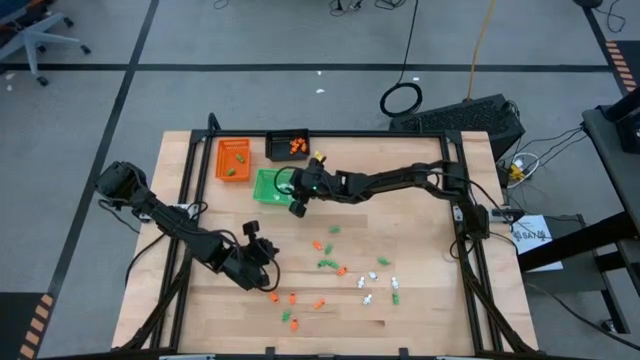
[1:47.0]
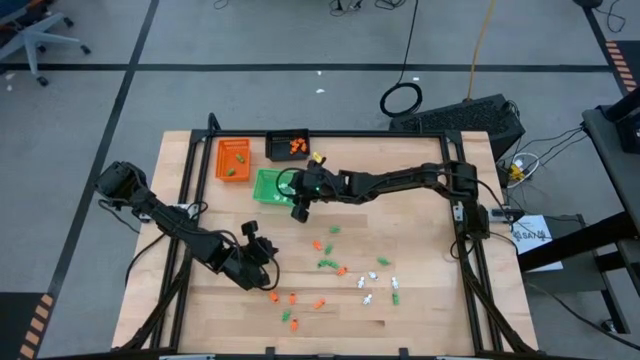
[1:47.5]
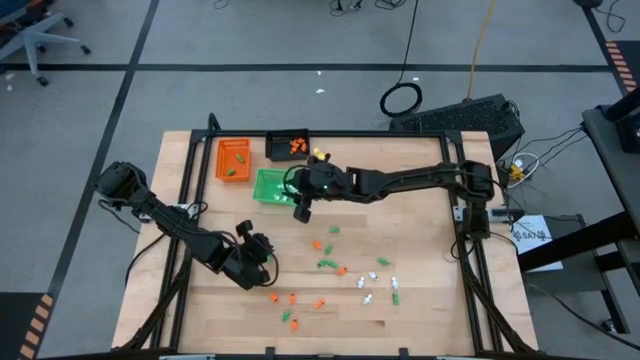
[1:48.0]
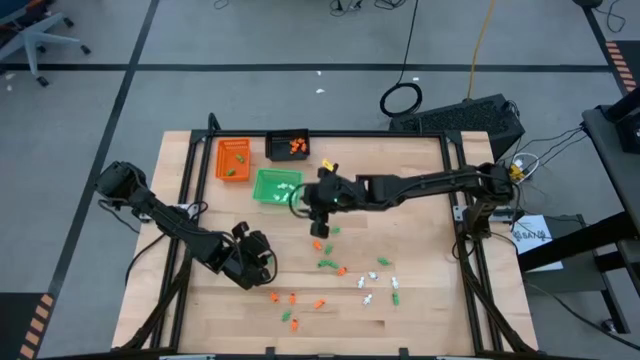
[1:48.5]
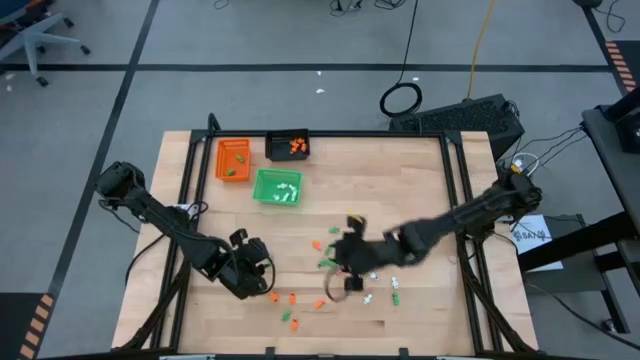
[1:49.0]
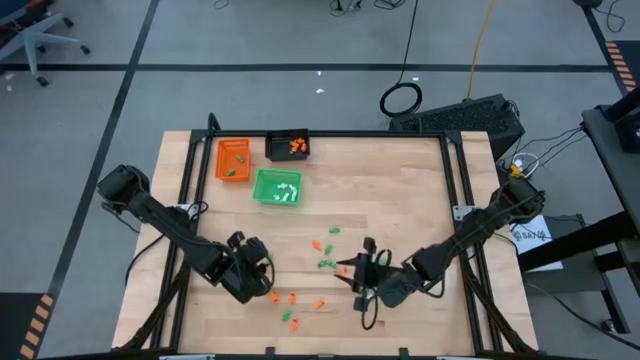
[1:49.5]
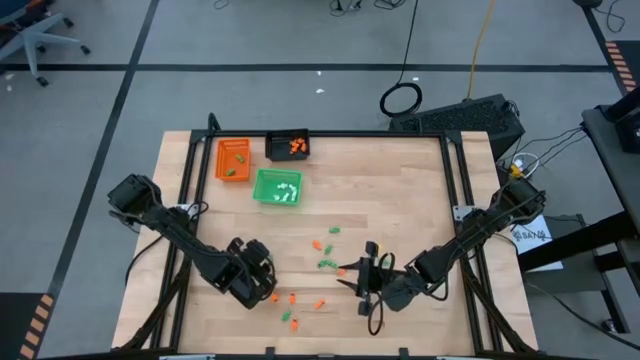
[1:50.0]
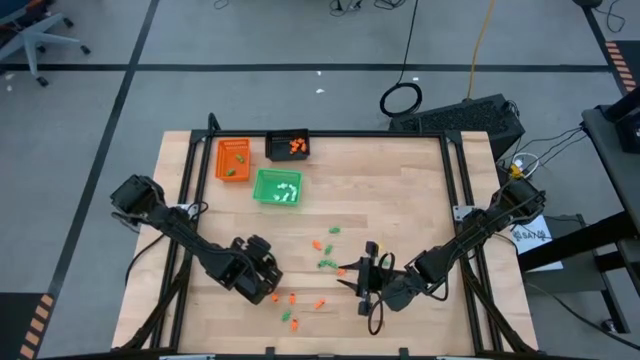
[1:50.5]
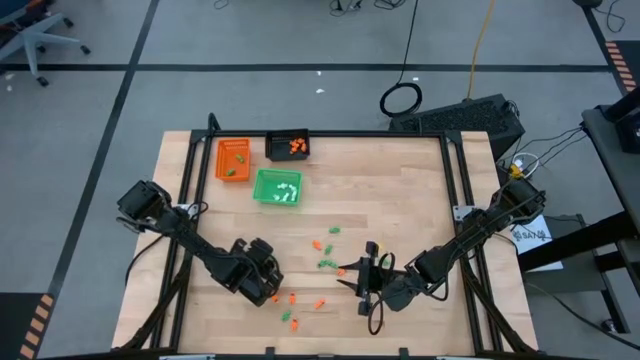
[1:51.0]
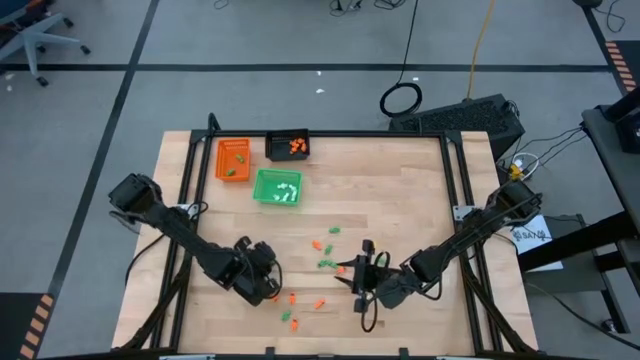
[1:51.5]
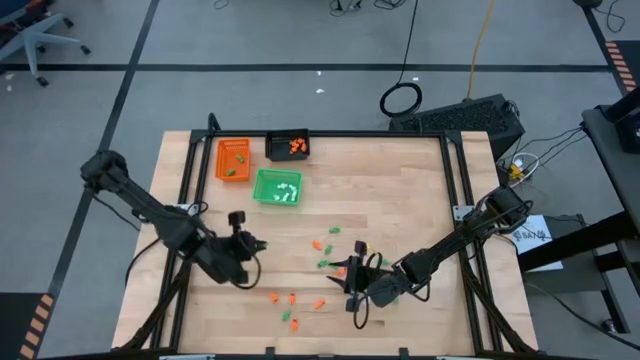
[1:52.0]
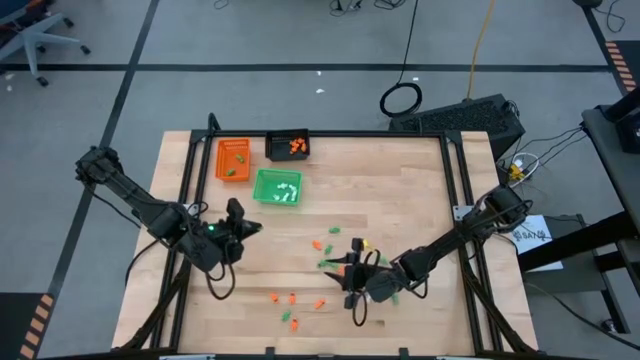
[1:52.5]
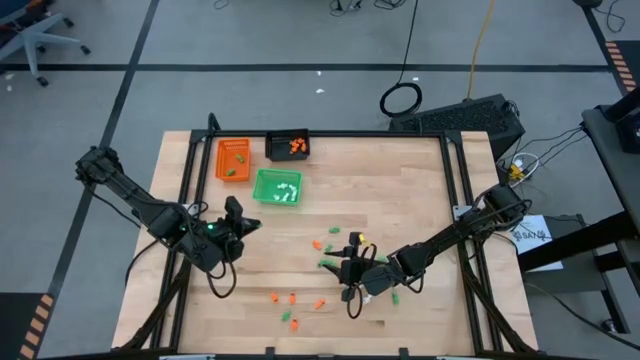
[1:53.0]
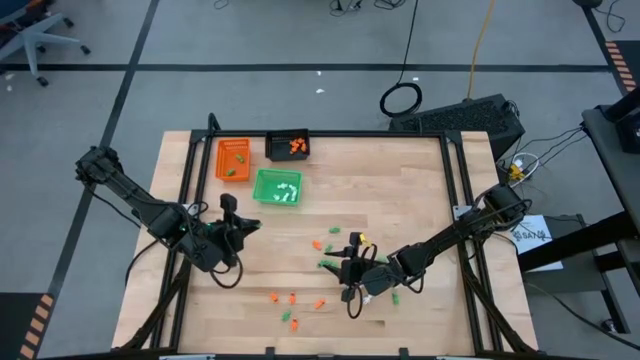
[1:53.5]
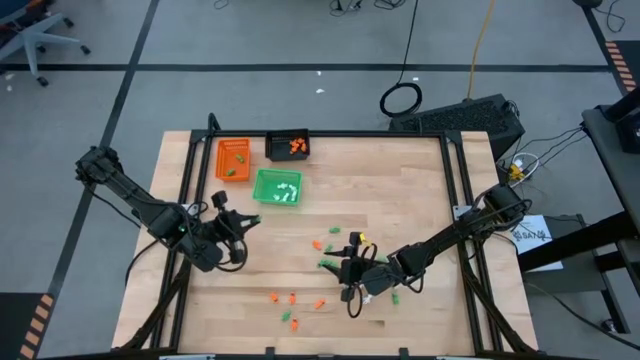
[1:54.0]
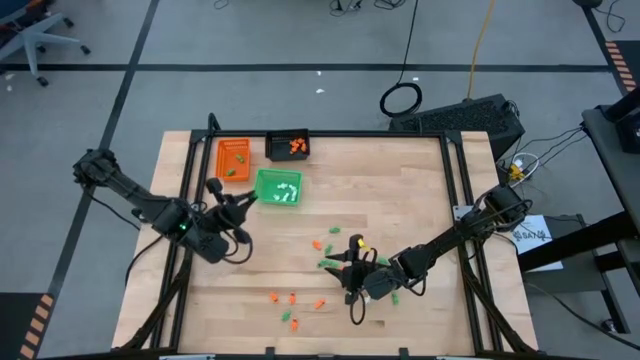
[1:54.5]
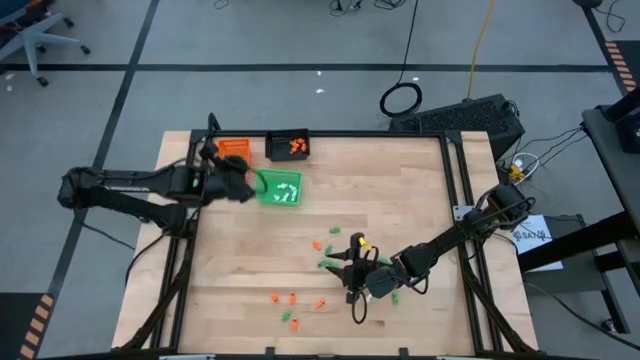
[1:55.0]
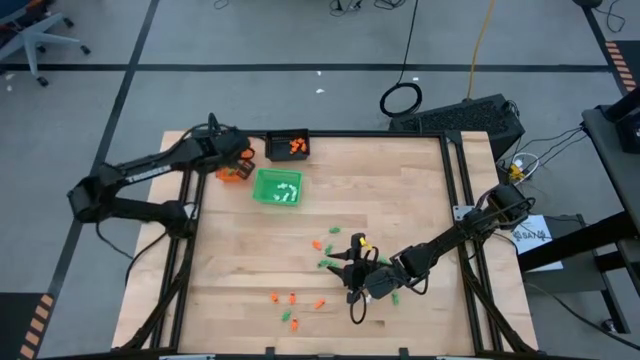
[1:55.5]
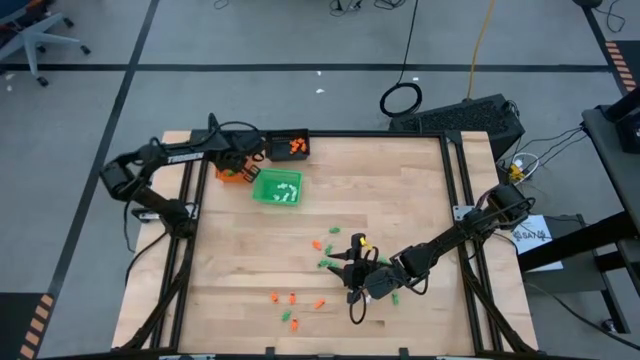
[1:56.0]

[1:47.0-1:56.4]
Task: Sort Halloween decoration
Put the green skeleton toy into the orange bin

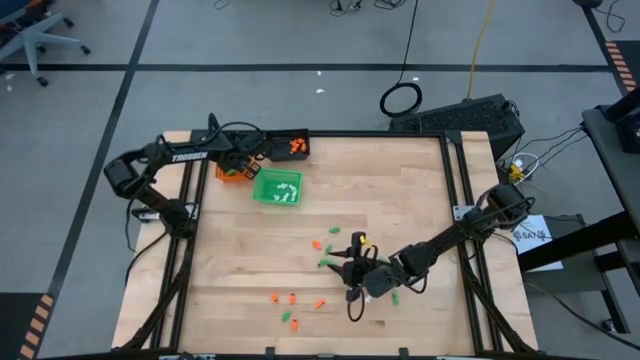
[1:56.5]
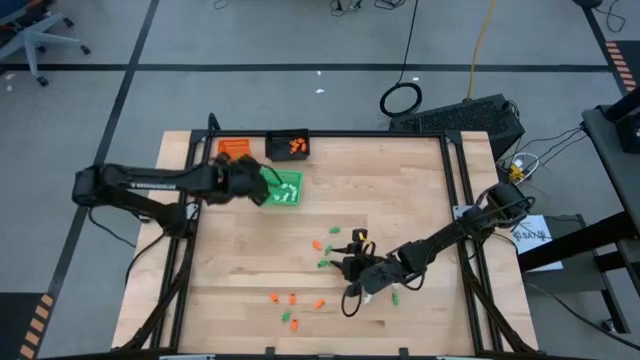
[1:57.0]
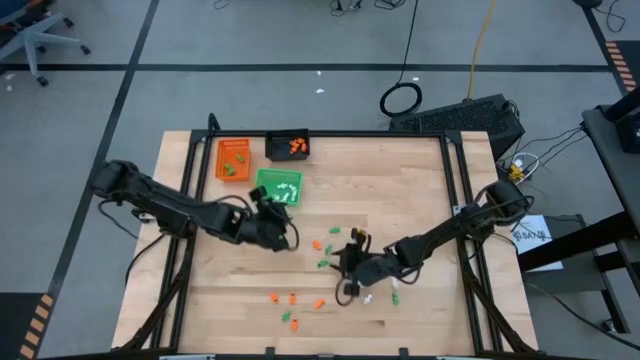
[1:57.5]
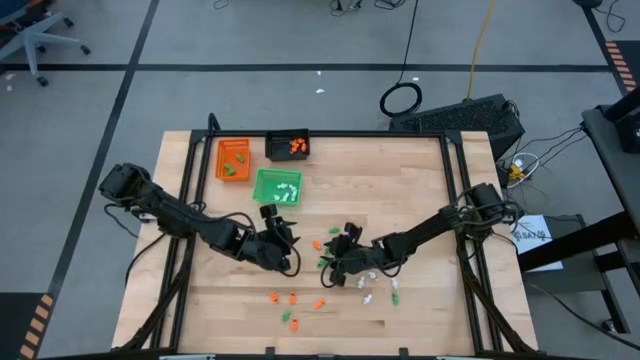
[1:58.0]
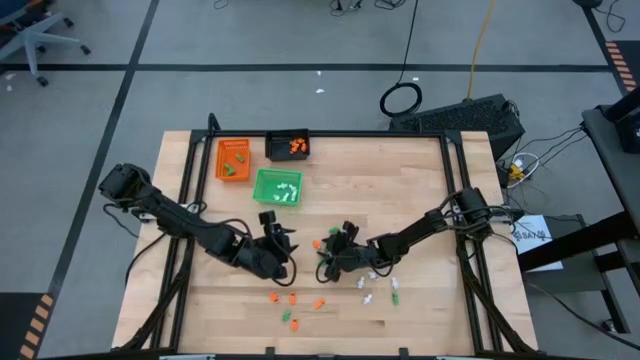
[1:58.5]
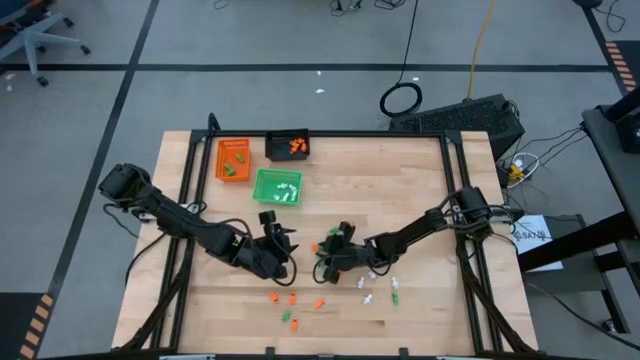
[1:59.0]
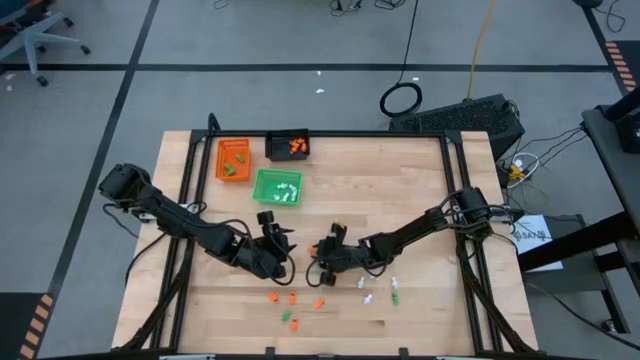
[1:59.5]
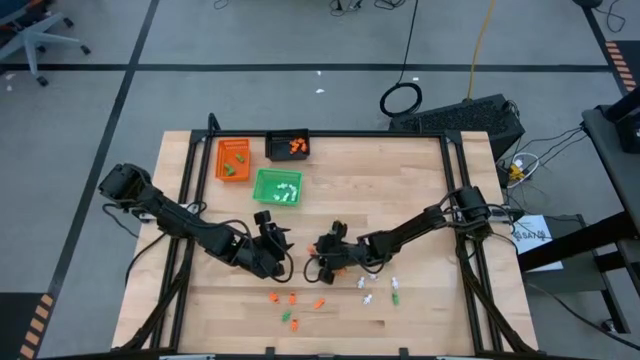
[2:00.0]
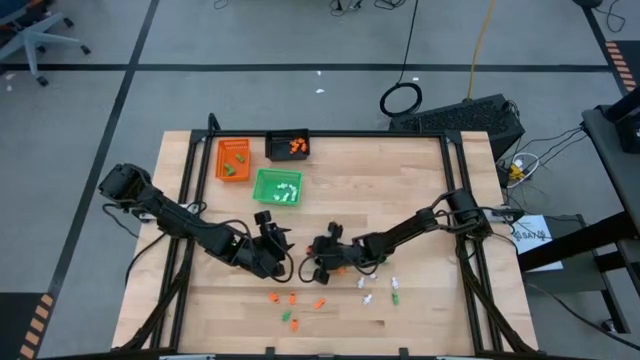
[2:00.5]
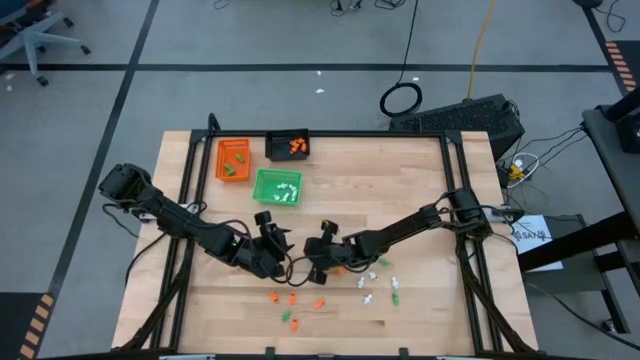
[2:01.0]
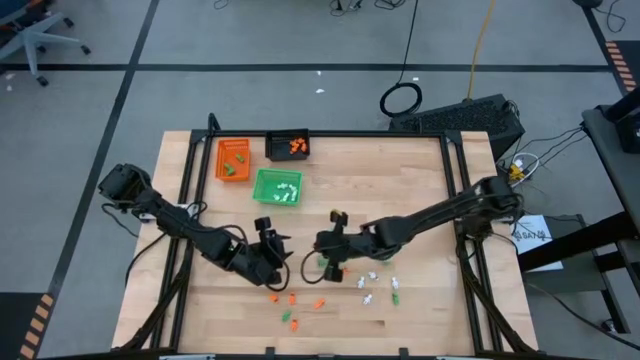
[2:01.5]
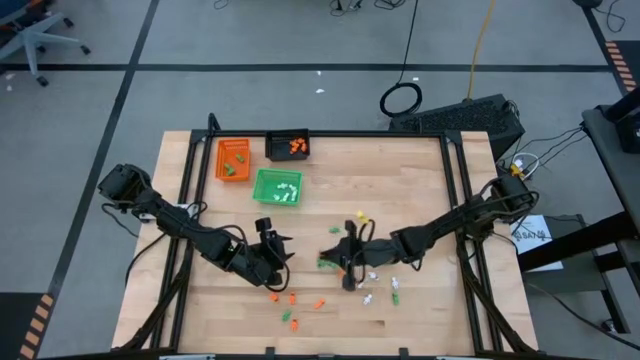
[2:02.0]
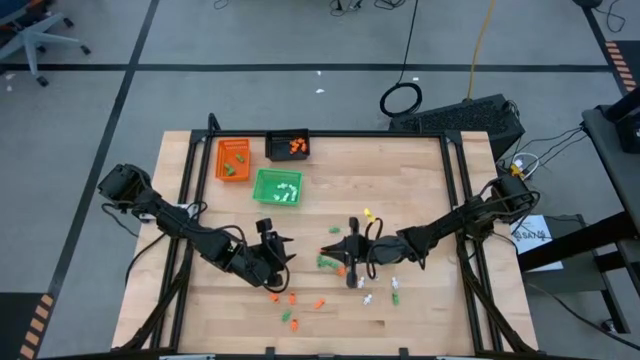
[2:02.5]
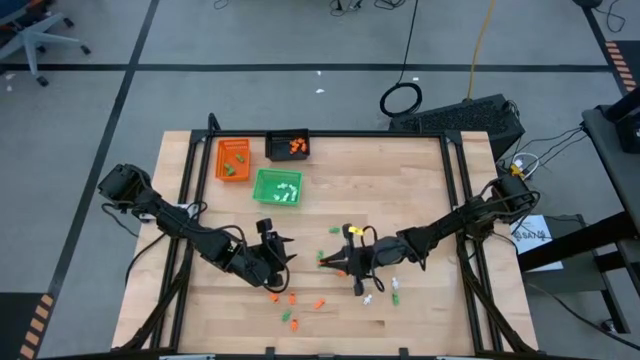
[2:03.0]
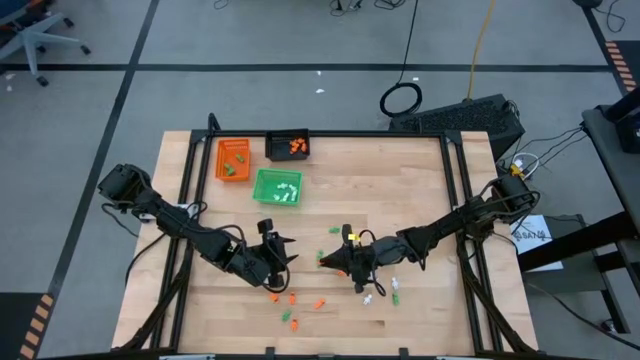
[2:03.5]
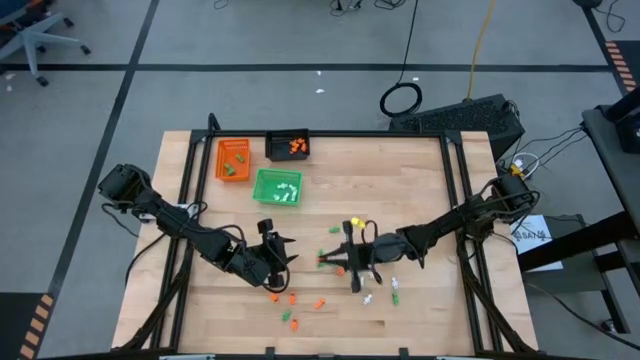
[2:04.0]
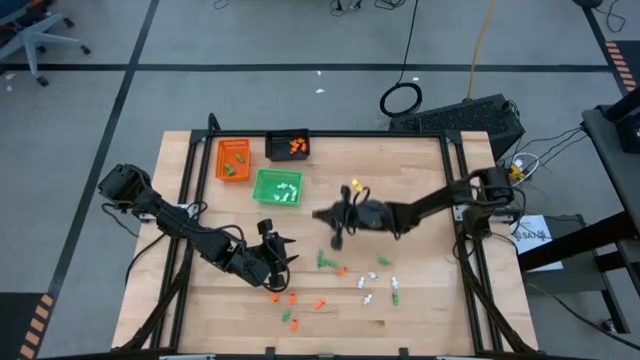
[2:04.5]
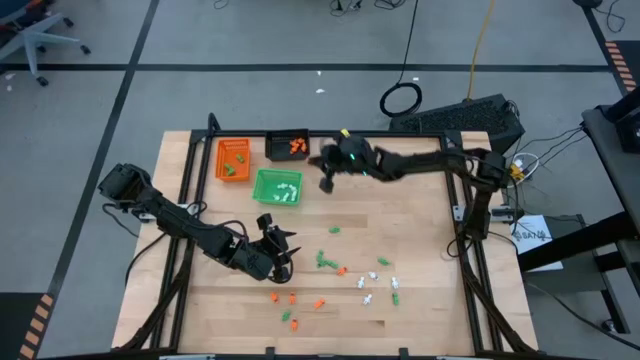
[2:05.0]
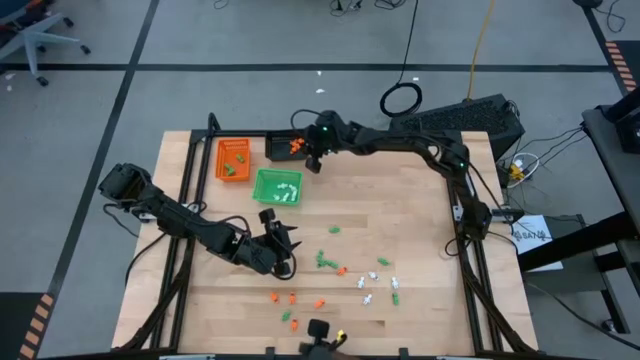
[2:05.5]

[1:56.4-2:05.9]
Put the orange skeleton toy into the black bin

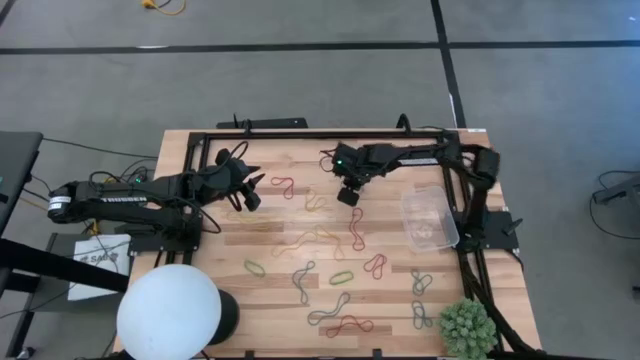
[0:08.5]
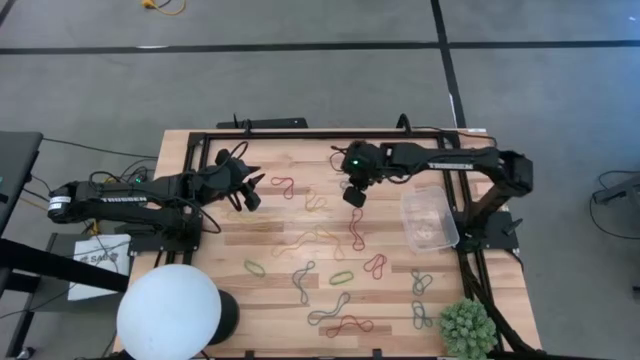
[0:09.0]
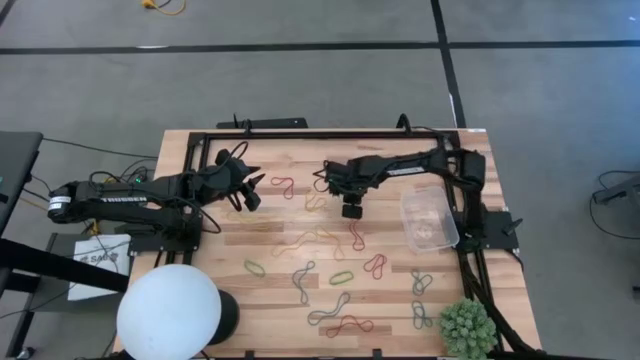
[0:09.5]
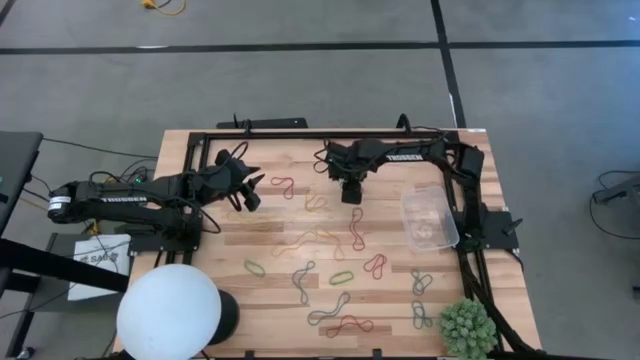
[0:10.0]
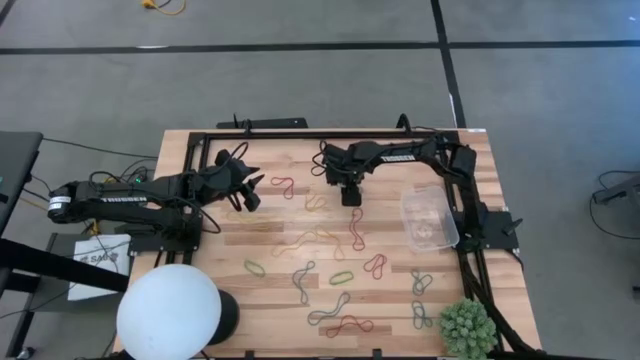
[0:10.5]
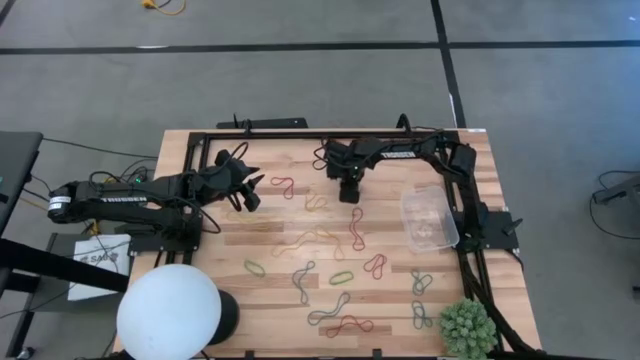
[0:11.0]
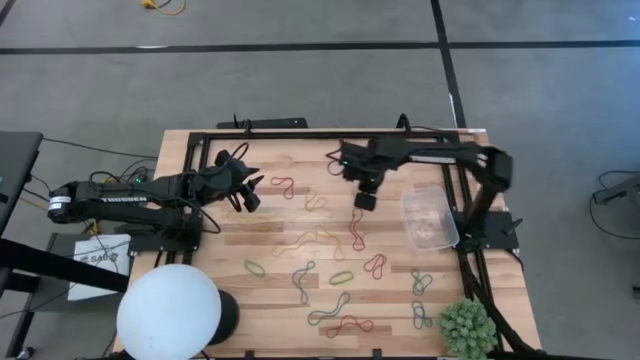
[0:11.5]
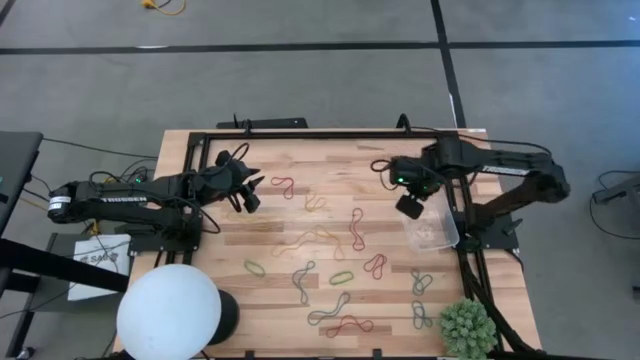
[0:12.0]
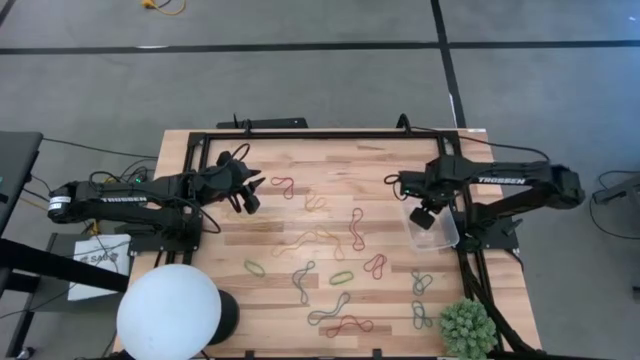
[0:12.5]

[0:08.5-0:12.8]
Task: Pick and place items into bin
Put the blue rubber band into the transparent bin
